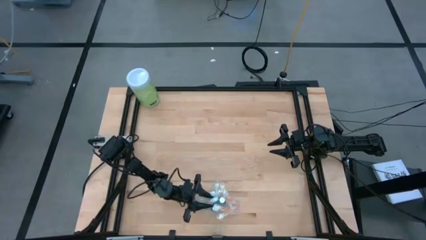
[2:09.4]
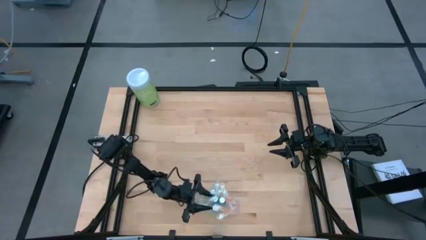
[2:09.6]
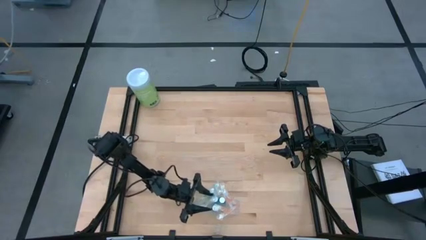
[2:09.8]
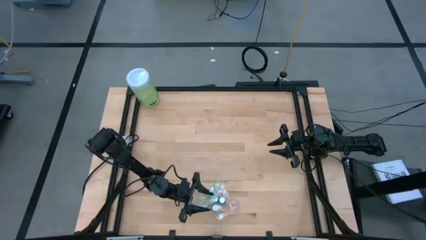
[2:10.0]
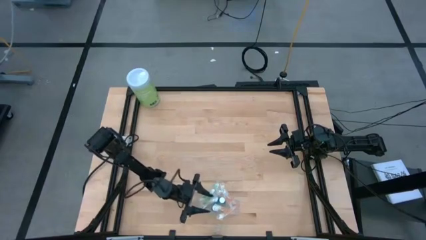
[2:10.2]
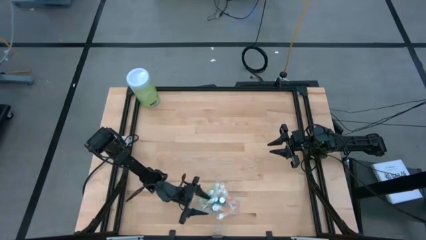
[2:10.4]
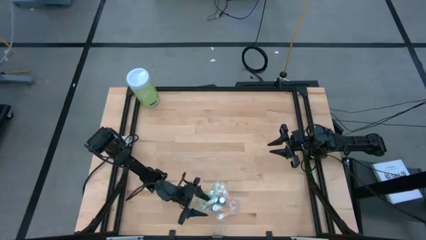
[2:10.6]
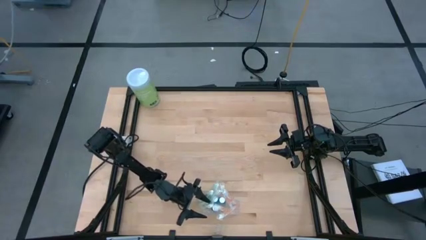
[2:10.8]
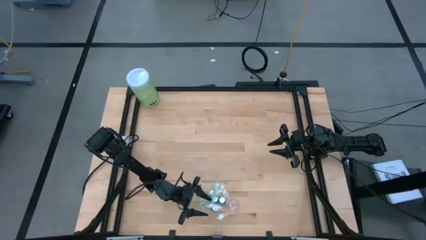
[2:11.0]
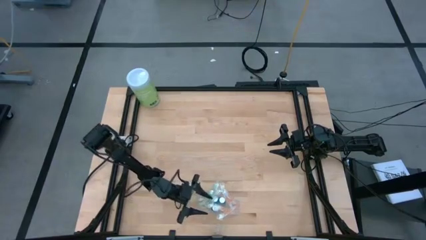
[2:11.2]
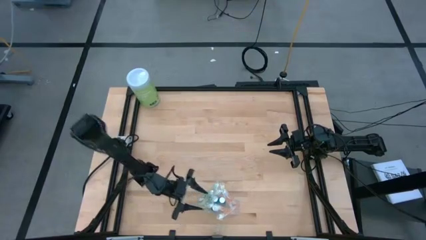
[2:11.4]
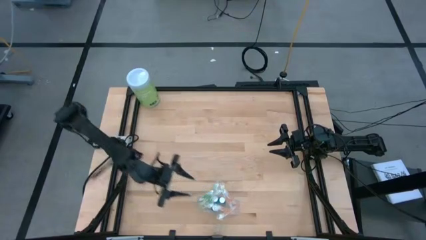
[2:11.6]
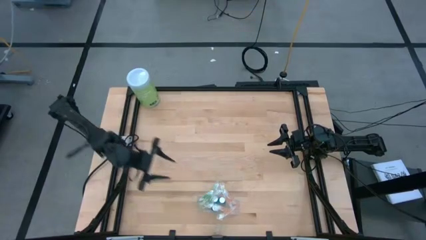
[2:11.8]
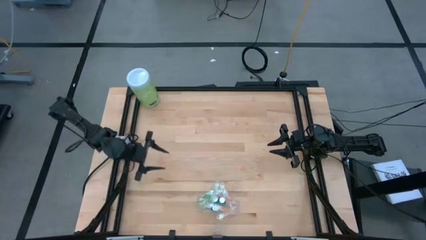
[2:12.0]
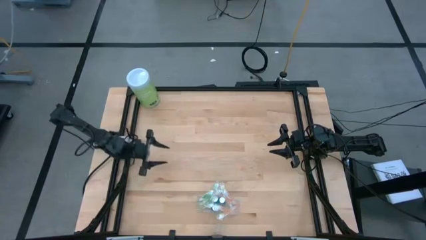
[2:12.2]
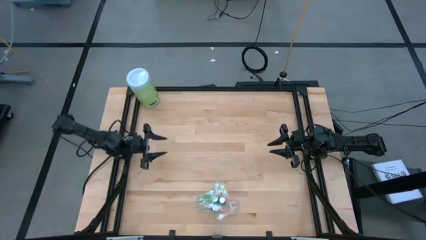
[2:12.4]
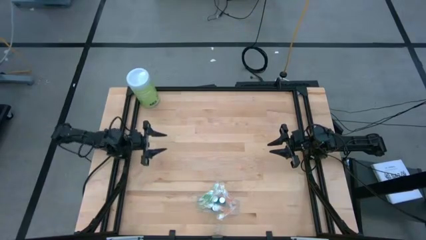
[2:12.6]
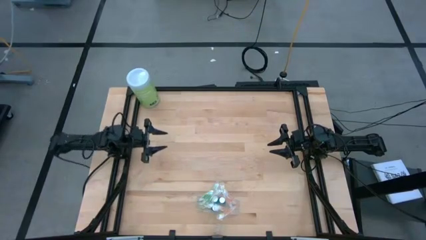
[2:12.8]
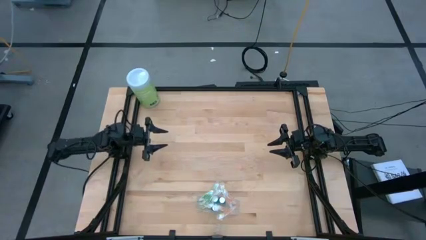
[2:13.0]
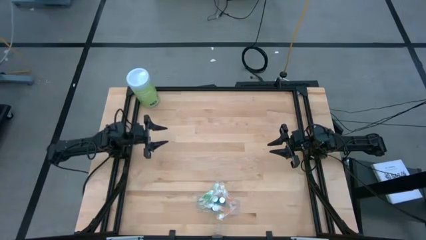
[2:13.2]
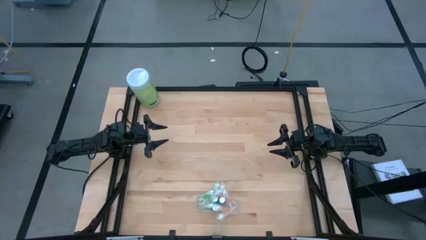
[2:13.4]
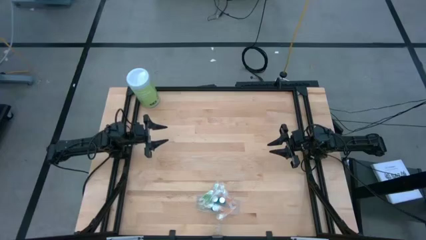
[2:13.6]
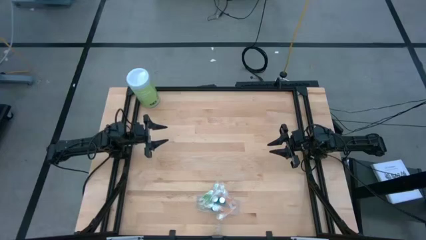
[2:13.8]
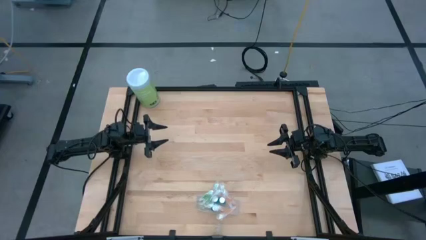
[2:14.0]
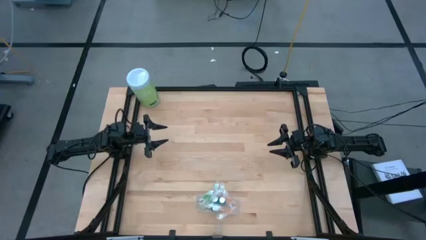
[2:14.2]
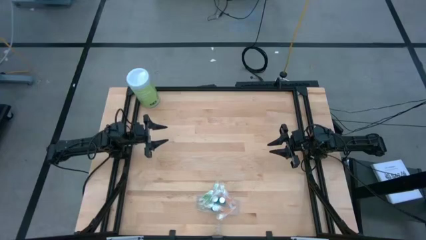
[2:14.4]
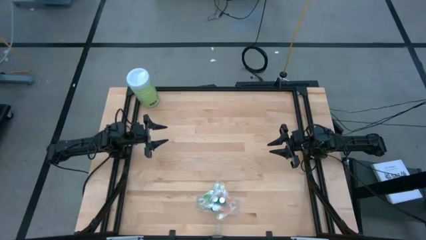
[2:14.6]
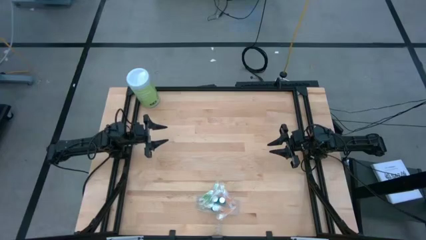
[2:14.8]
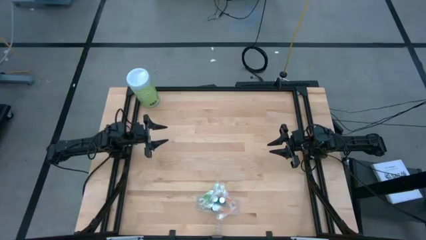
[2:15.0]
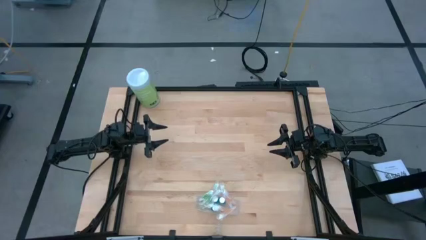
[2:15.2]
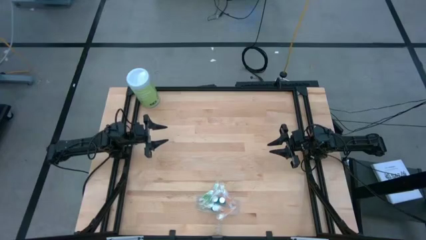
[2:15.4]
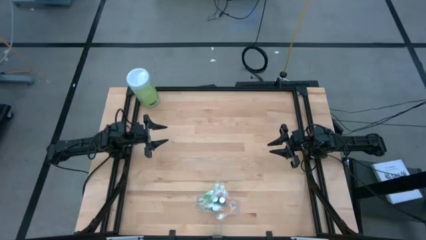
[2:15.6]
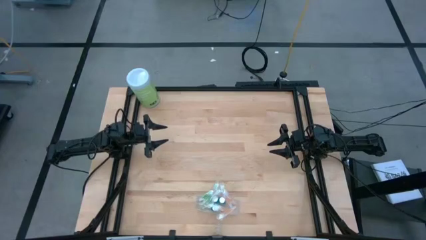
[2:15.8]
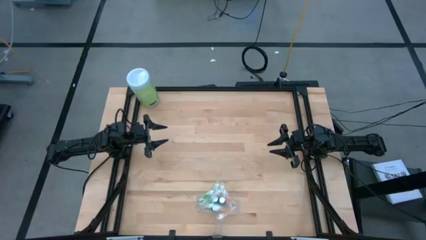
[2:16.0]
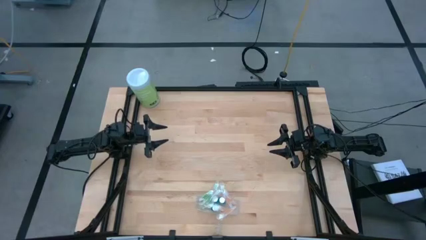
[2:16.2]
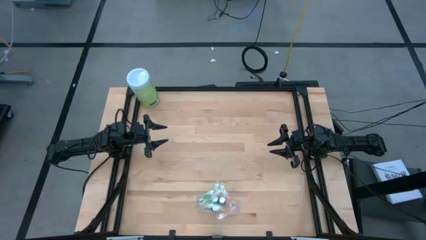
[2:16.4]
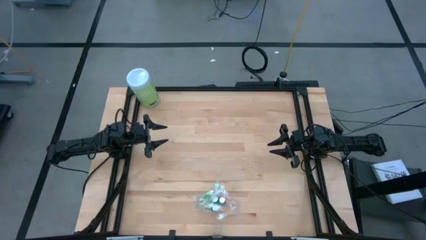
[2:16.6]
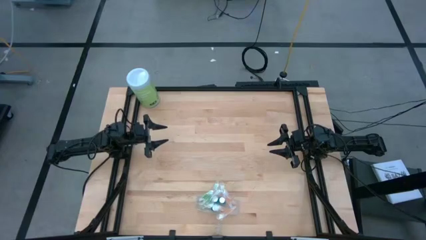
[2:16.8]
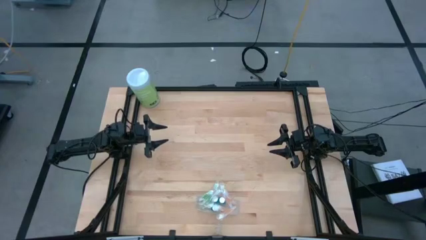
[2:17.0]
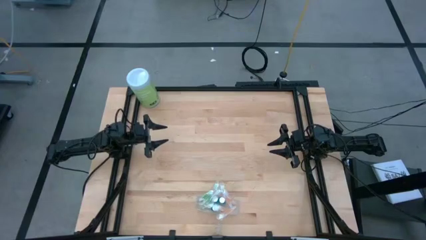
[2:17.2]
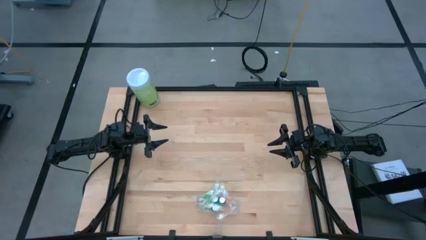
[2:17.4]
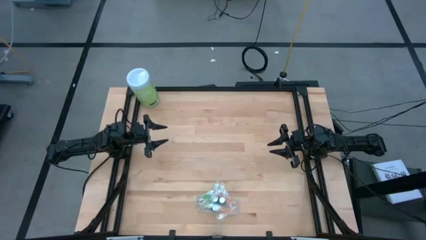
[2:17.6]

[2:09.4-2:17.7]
Task: Pick & Place toothbrushing station
Return to Home Position

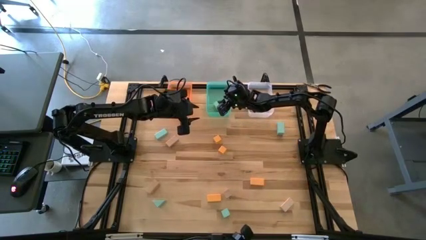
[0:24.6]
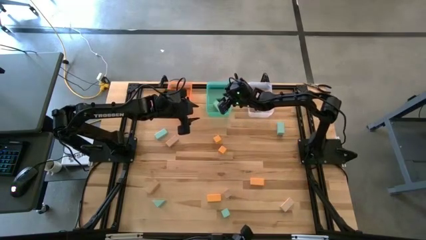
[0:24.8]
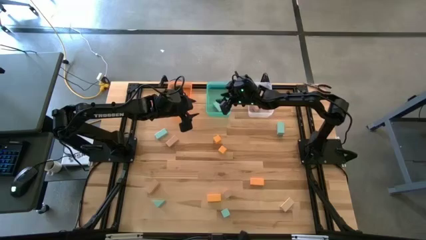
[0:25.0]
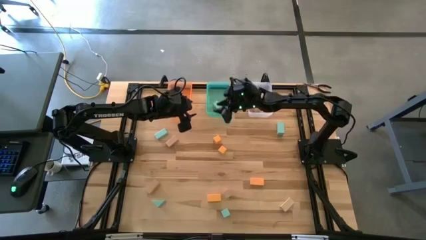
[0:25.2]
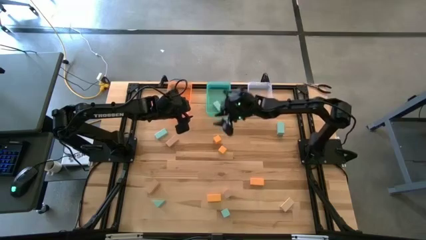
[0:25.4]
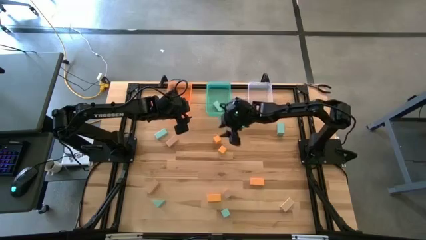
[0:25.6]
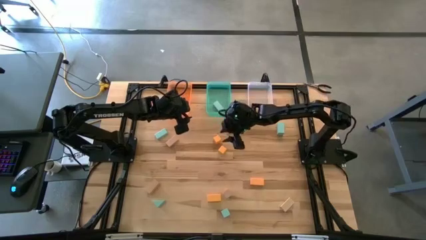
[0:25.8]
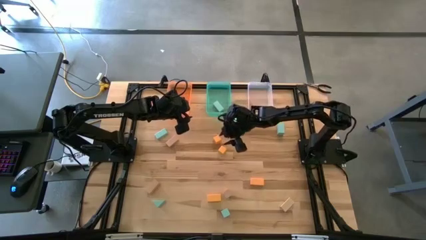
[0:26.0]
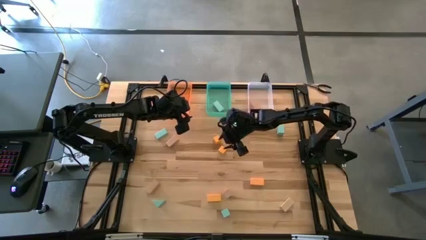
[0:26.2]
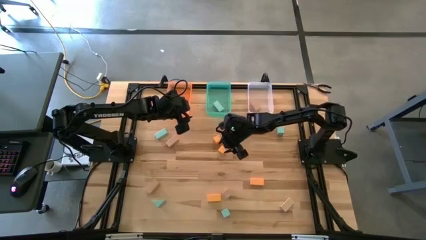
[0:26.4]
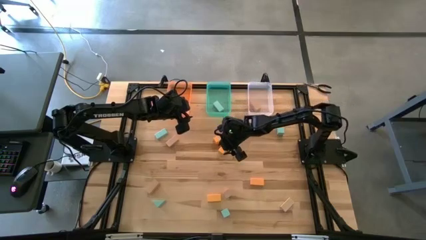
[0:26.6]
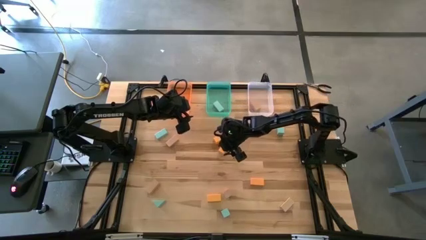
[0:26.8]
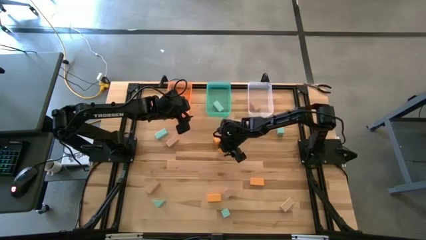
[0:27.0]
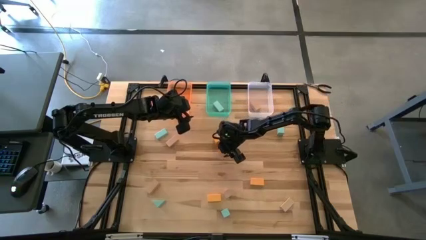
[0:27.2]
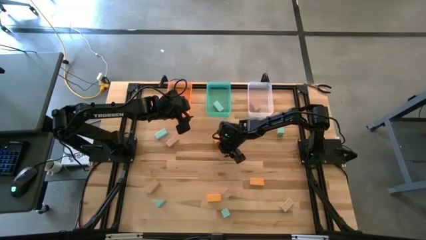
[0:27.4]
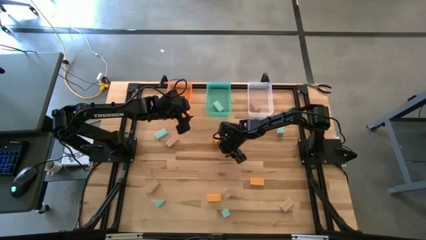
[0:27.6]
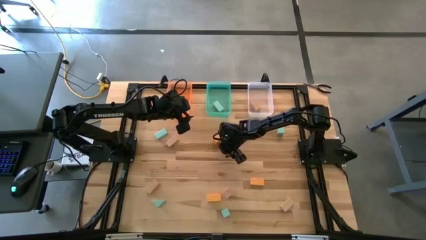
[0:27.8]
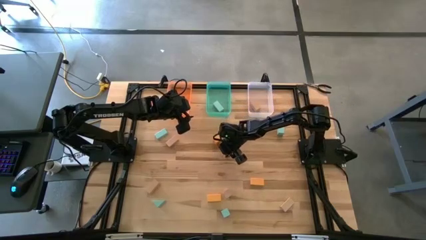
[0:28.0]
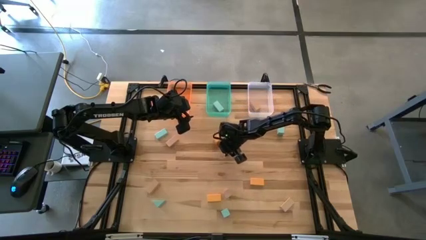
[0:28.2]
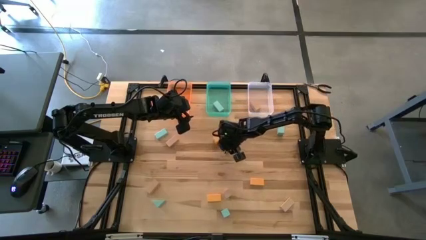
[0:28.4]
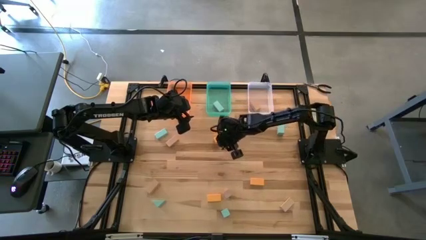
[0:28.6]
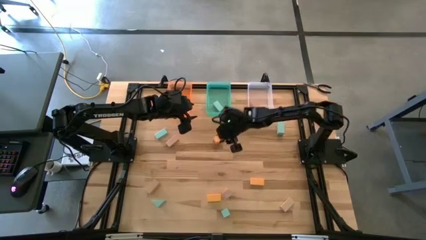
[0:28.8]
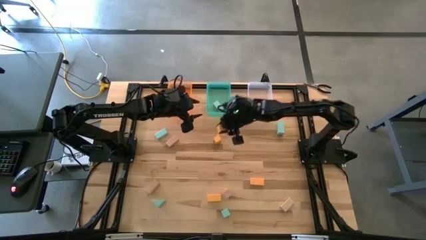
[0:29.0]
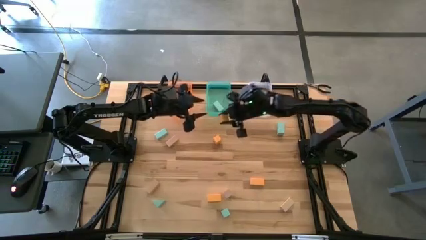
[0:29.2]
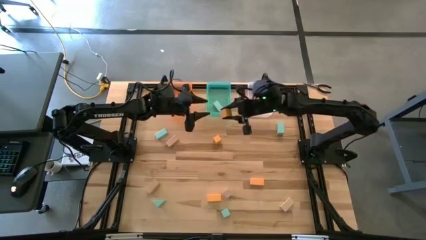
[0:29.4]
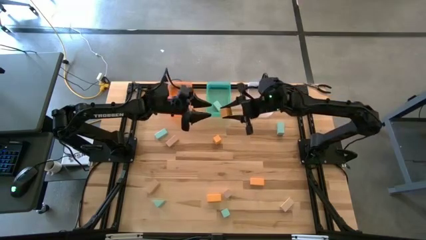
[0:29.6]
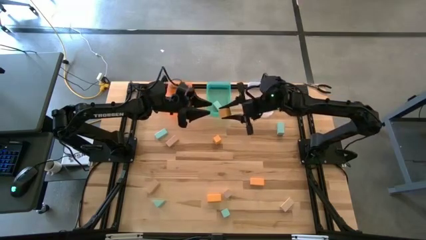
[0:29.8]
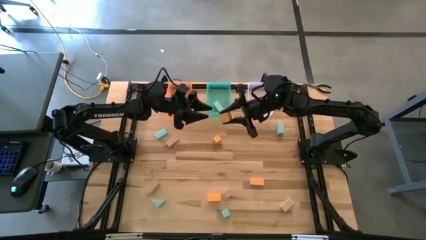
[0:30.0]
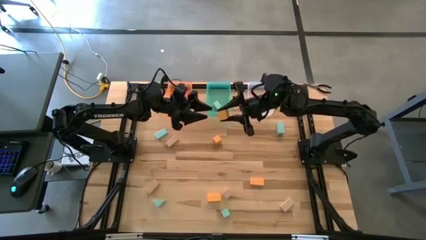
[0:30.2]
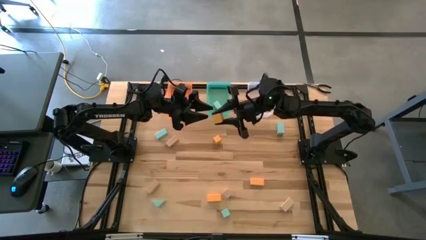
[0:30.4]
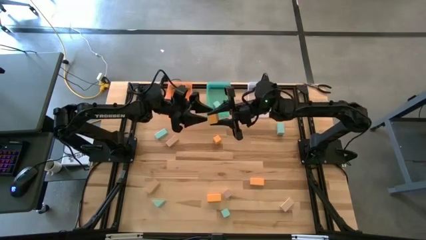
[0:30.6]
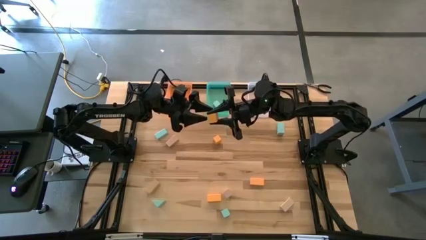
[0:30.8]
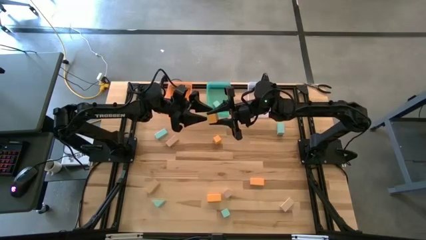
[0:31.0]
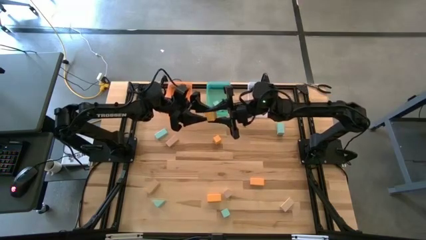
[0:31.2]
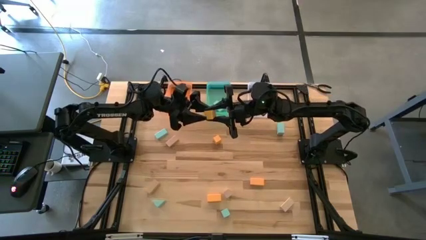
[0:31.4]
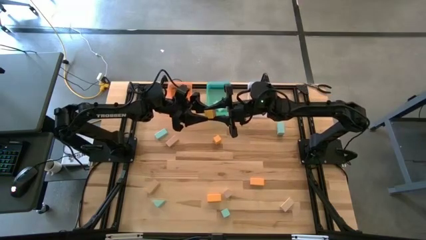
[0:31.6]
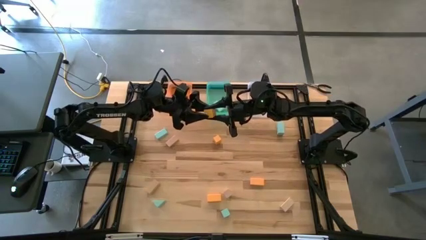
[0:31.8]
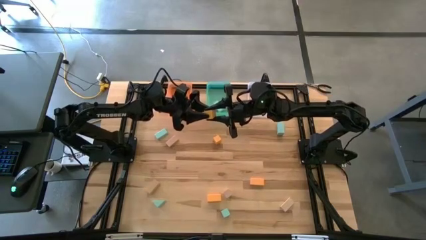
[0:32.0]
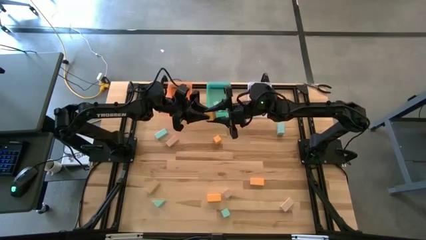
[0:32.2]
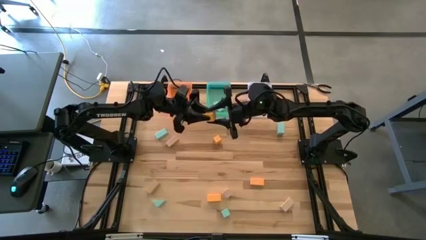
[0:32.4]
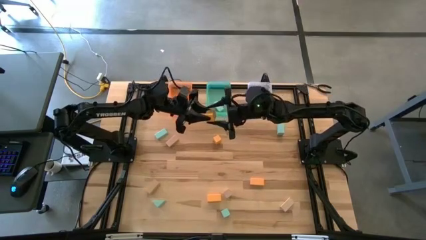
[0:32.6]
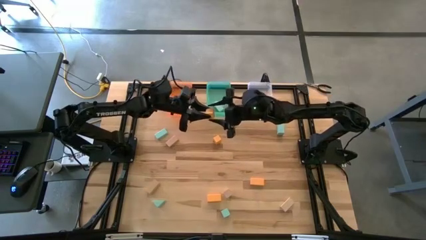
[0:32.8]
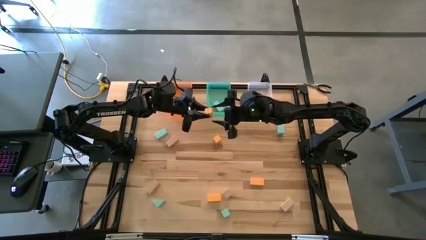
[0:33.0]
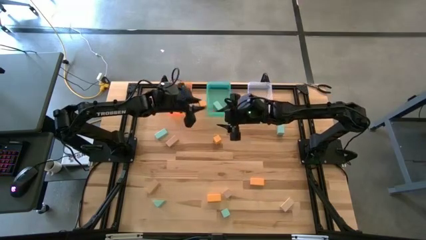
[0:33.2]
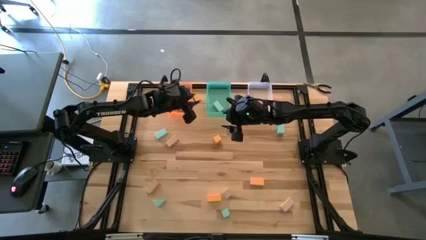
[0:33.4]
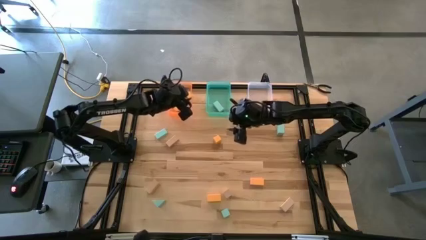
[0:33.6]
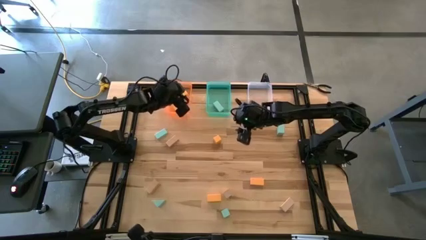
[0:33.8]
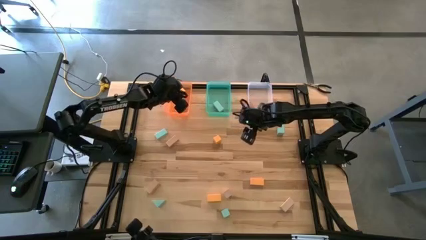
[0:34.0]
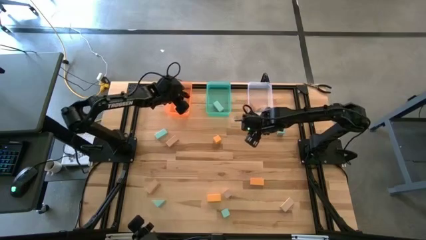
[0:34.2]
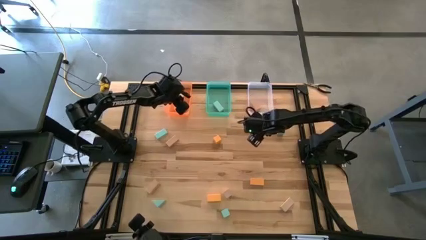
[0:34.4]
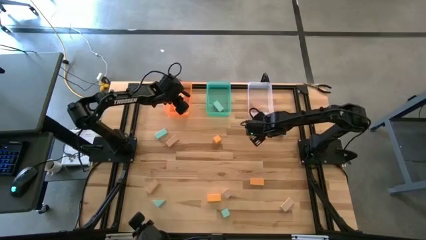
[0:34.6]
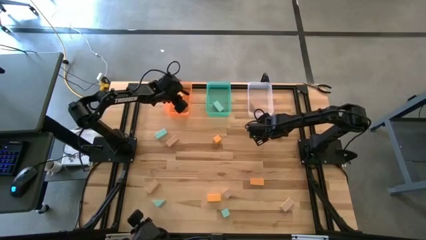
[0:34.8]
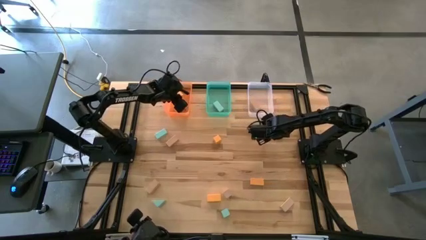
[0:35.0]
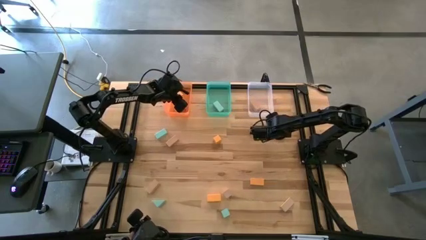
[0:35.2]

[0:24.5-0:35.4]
Task: Sort & place blocks by color
Put the orange block into the orange bin
